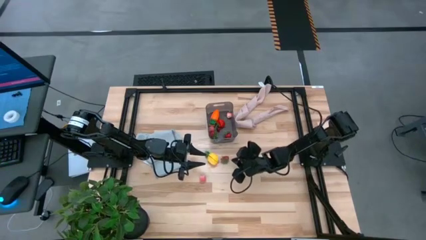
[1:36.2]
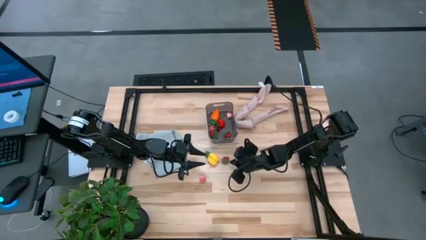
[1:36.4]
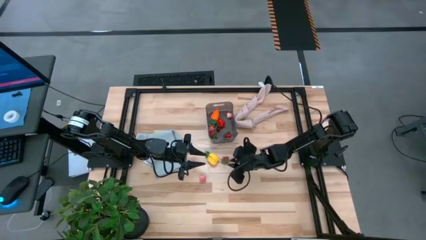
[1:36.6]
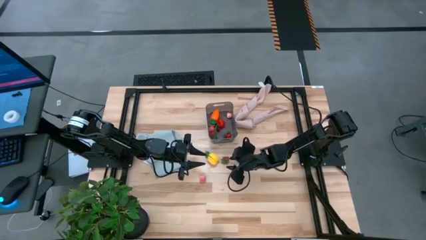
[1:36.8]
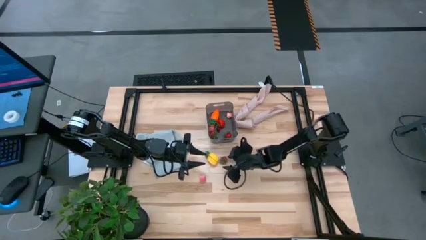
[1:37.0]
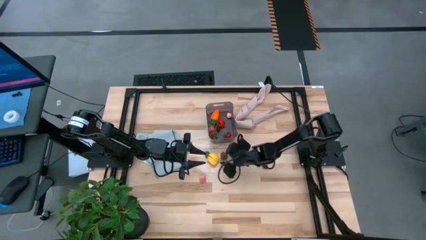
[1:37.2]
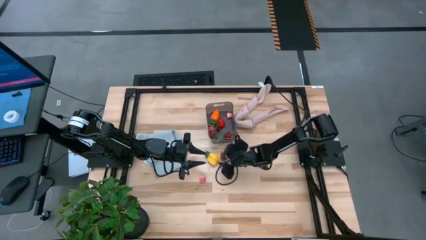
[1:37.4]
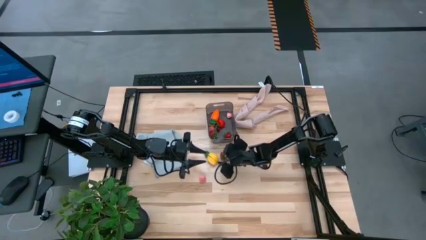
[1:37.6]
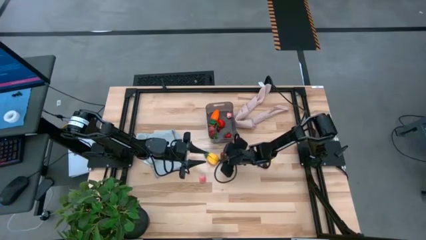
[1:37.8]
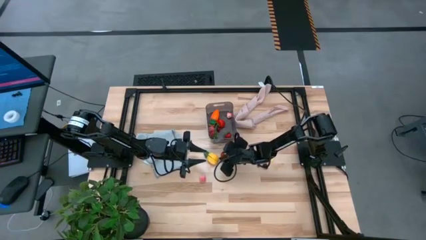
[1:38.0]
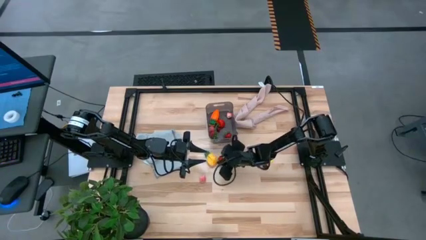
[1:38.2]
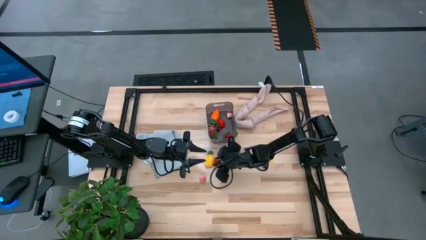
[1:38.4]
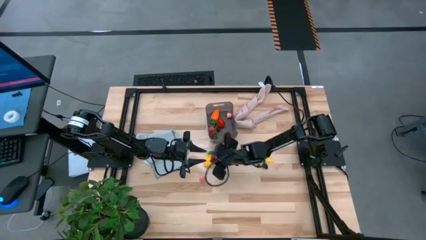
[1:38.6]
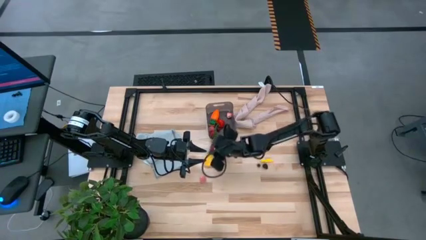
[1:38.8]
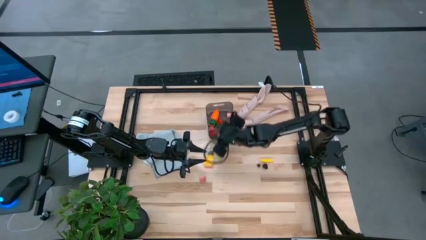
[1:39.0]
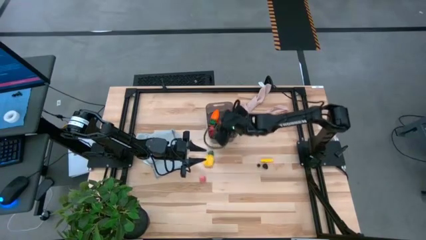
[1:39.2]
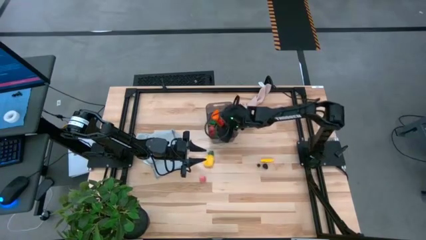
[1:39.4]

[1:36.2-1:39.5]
Task: Pick and placing Produce into tupperware
Put the red strawberry into the black bin

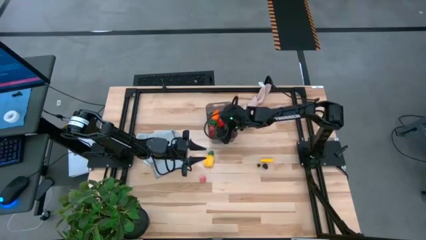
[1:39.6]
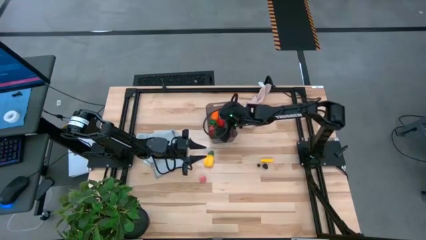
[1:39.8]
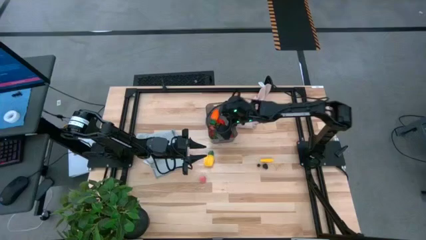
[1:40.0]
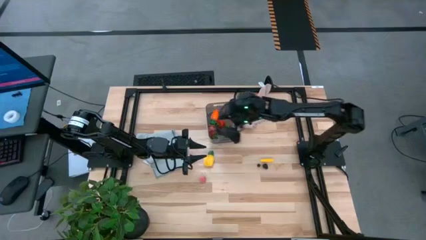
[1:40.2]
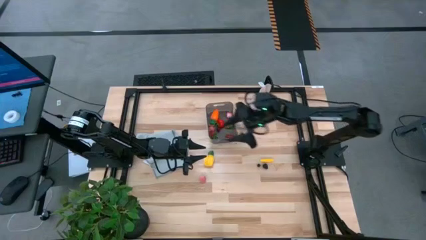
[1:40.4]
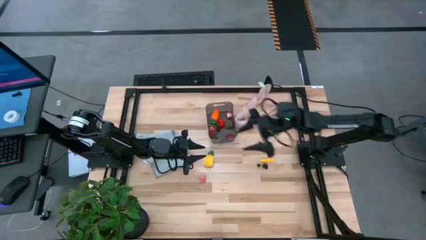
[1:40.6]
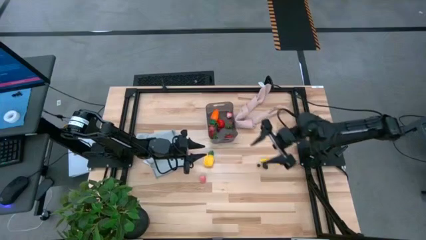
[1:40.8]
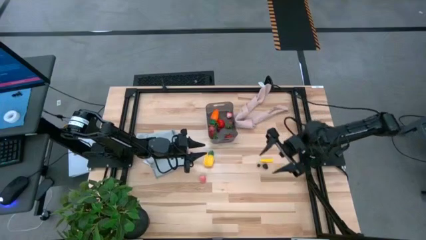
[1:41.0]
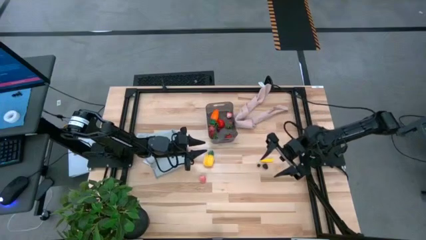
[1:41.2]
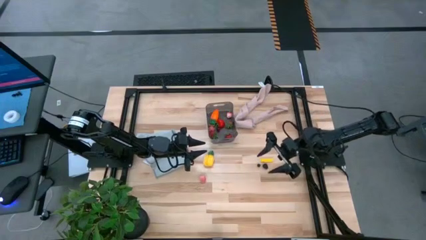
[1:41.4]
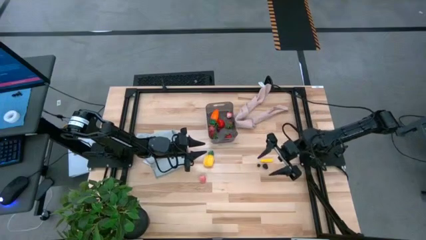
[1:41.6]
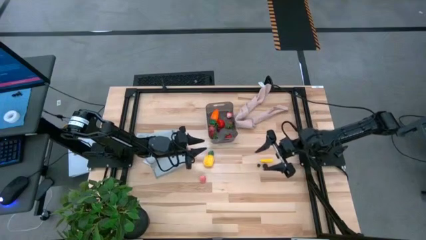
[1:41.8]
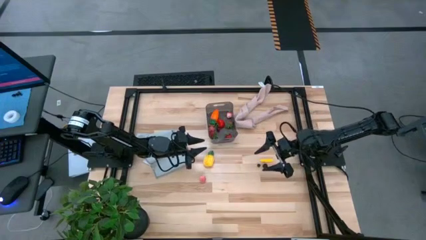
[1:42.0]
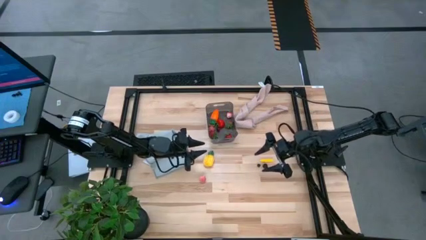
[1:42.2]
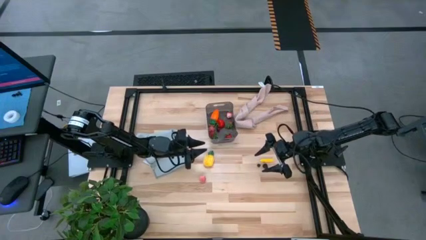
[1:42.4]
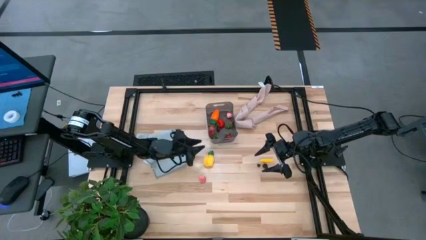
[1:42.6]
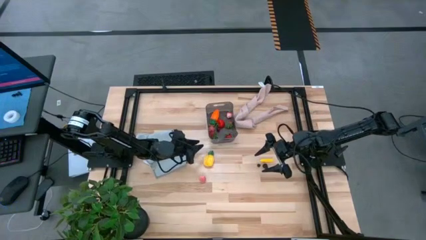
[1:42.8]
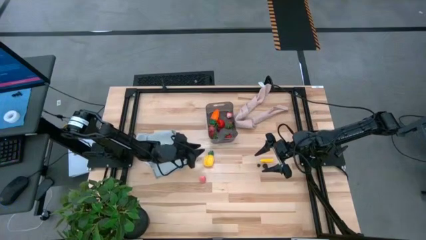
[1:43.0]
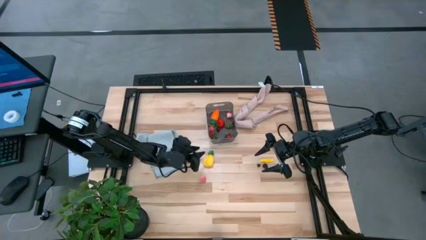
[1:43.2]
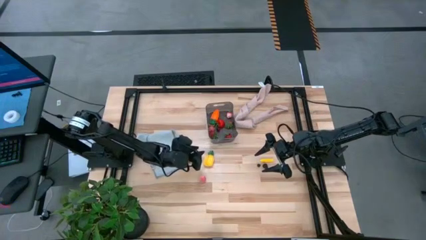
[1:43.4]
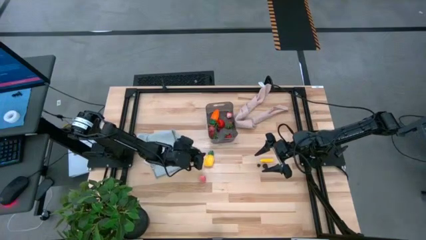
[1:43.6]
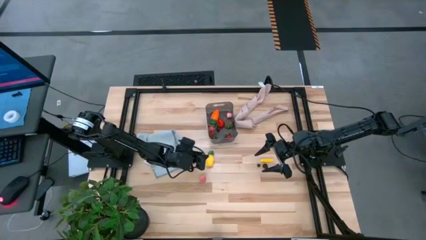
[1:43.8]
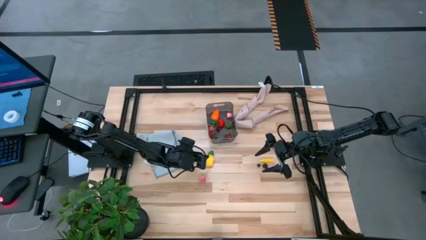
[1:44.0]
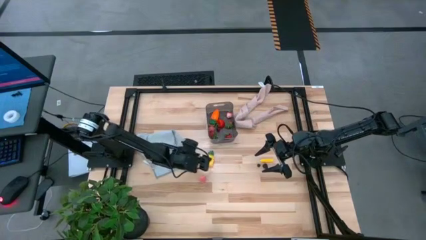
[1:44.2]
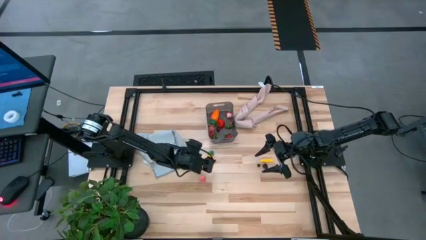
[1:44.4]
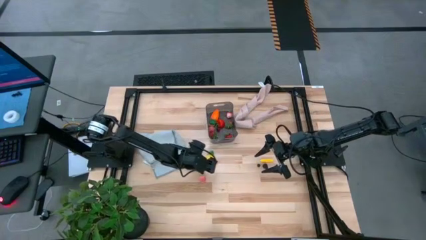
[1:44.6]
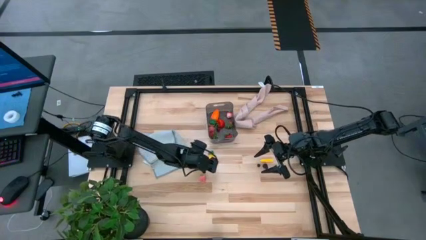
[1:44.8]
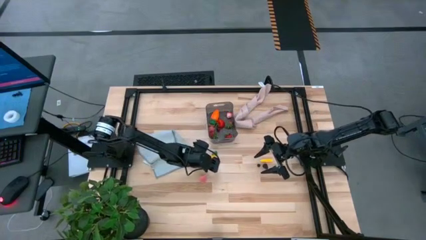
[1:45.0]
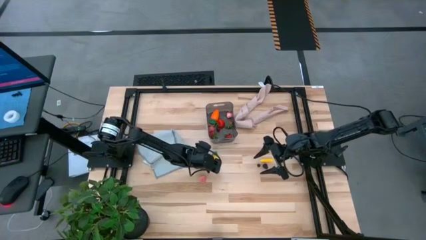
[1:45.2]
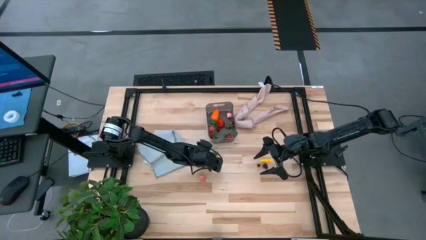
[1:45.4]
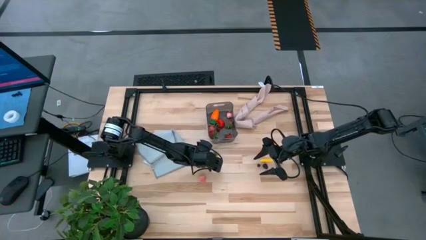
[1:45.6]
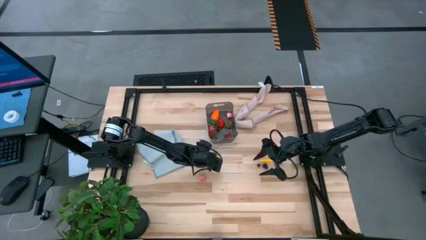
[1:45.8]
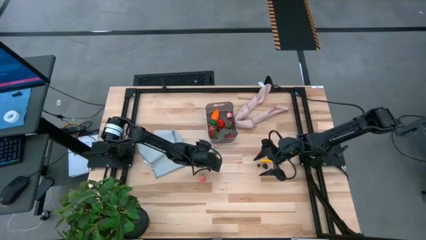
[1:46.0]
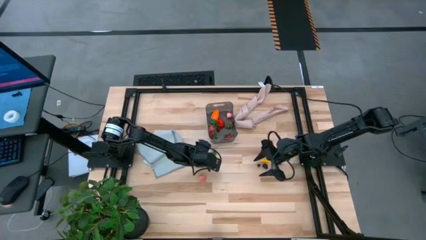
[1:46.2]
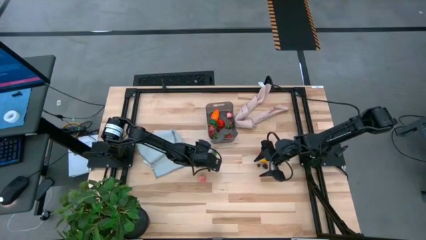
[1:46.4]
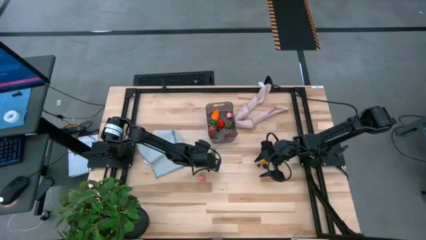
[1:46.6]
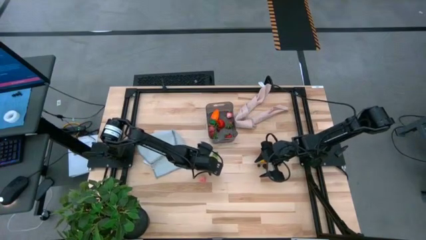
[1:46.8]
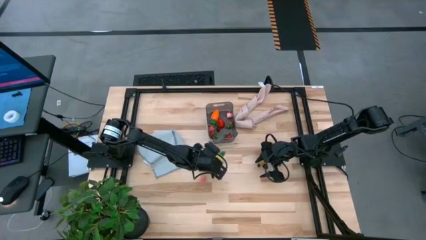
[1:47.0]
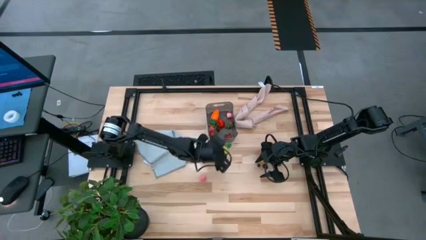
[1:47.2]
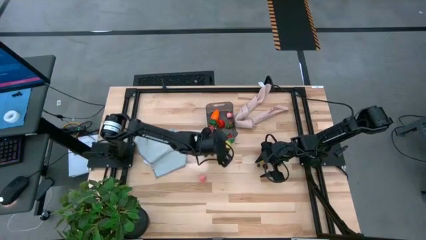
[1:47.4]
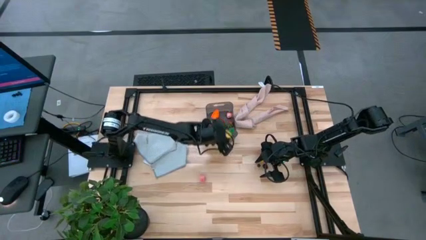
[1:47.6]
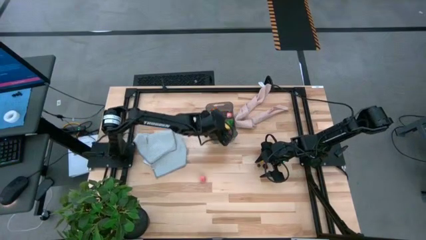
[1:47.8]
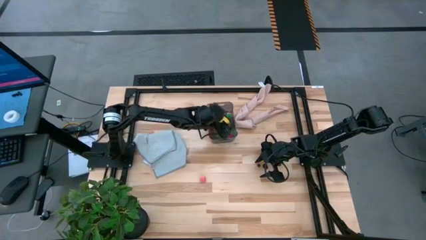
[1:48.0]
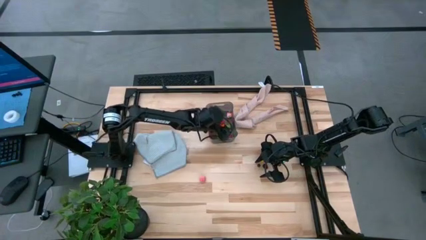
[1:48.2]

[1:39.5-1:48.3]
Put the yellow pineapple into the black bin

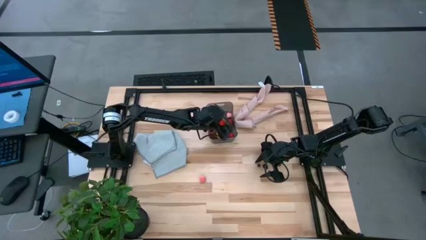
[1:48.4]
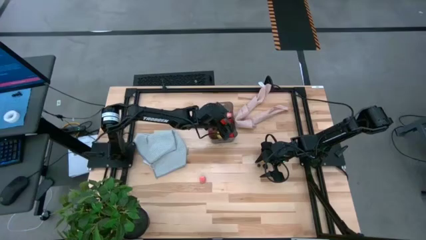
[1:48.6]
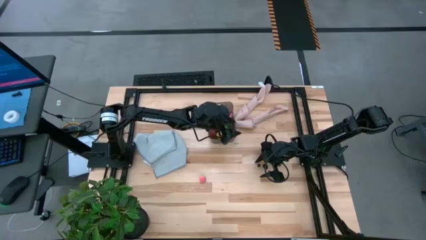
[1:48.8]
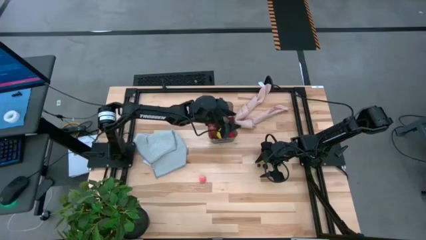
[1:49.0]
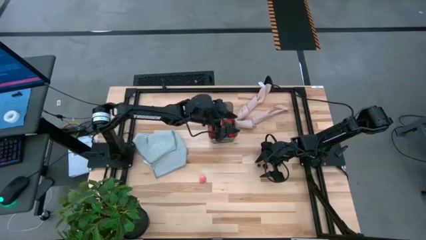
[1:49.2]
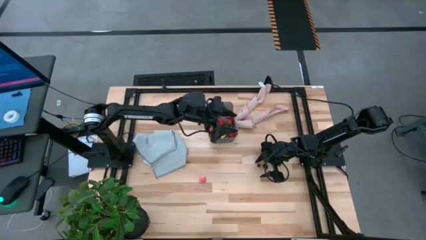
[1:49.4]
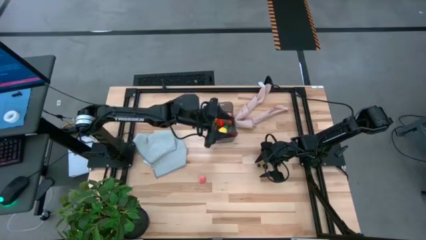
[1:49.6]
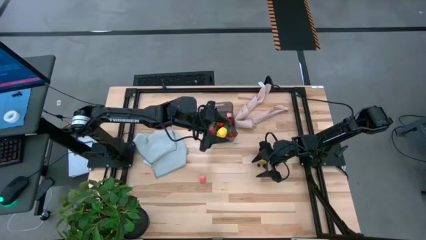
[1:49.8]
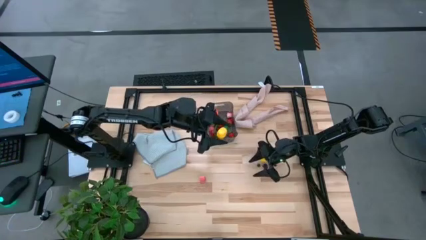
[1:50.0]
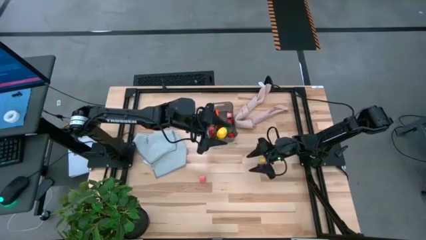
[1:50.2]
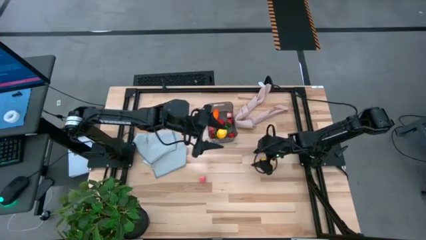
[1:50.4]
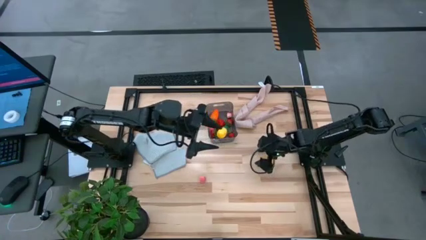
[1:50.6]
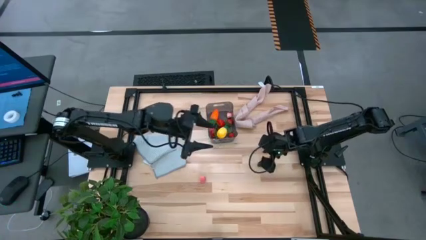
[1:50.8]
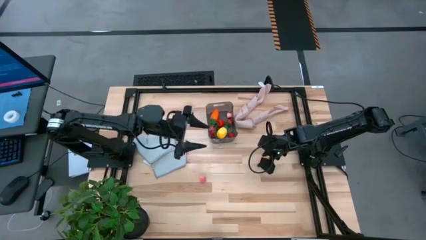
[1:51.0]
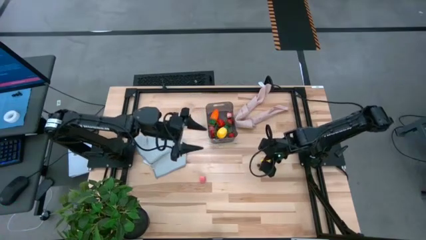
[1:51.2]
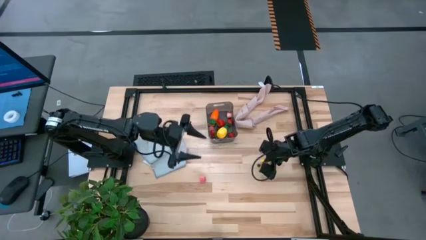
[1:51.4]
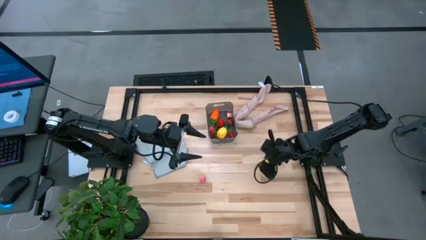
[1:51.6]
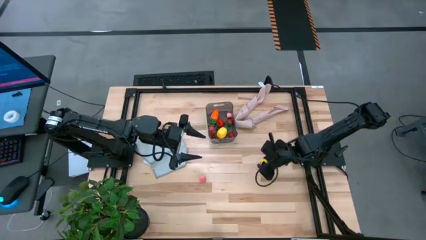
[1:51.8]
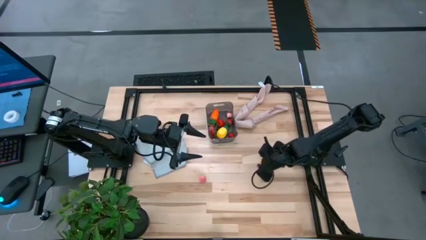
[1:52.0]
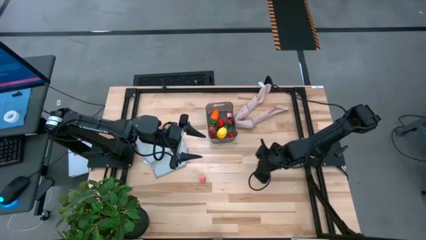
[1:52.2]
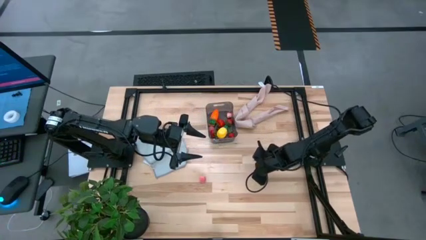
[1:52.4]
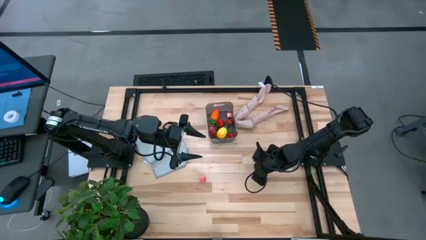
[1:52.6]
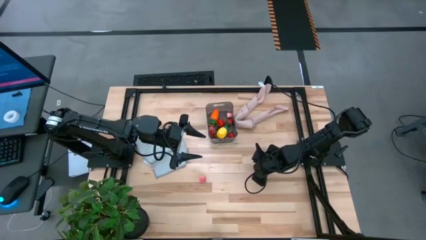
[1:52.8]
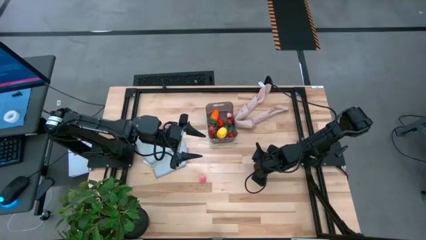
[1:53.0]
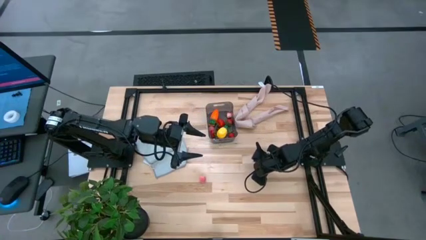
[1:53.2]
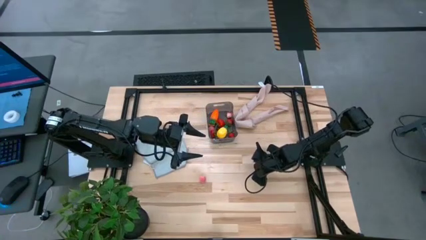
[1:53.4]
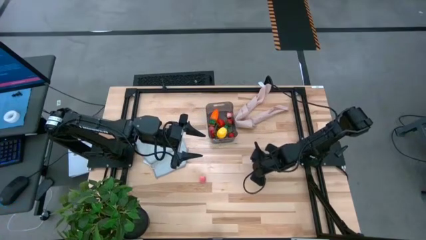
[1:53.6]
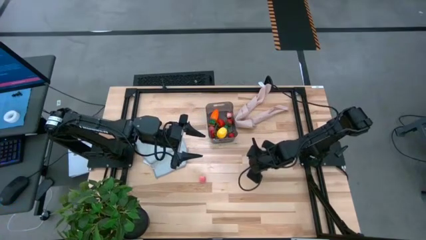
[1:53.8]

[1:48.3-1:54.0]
Put the blueberry into the black bin
